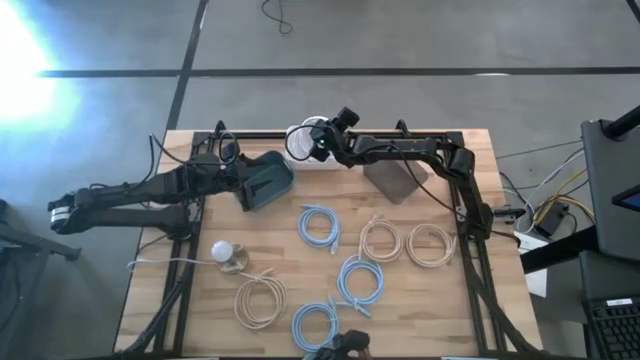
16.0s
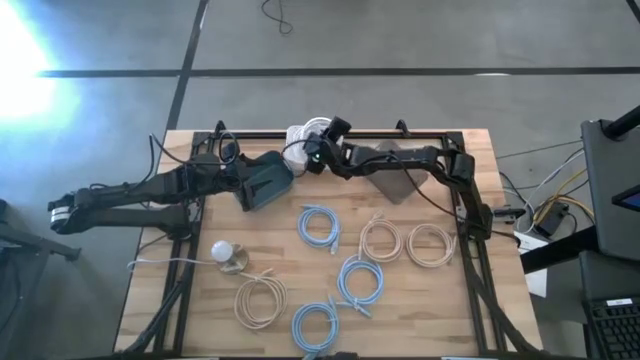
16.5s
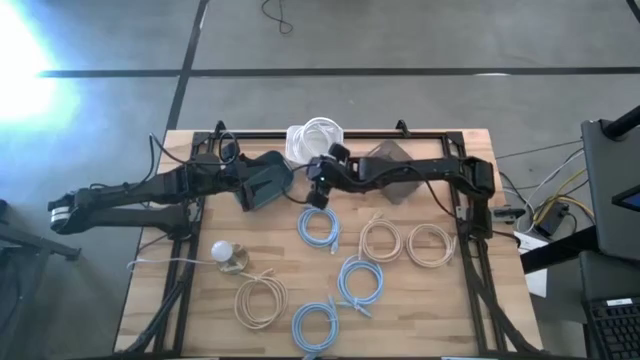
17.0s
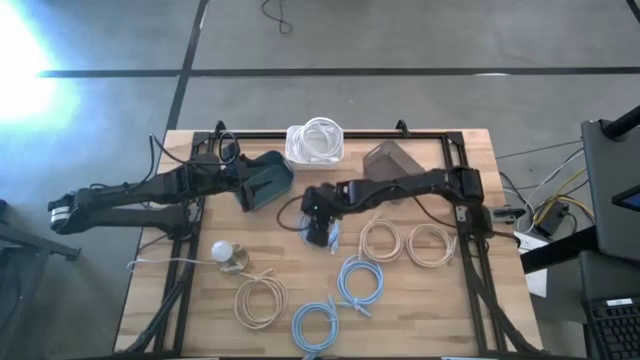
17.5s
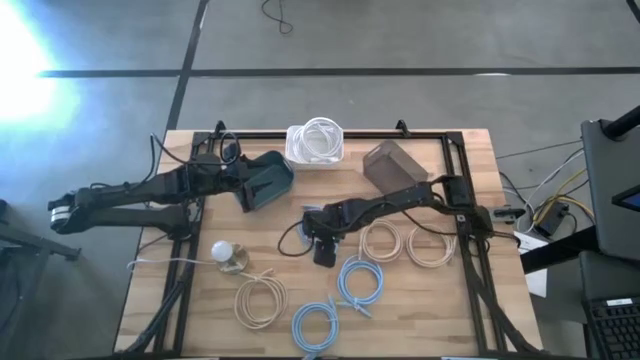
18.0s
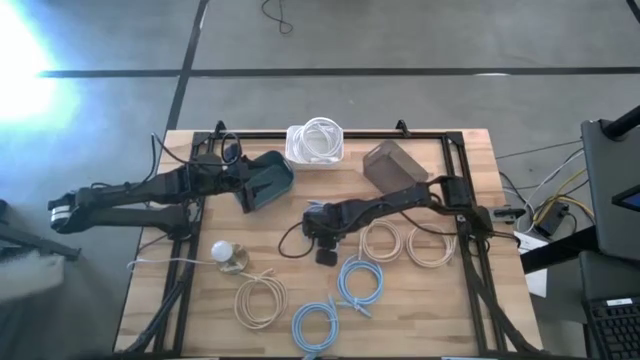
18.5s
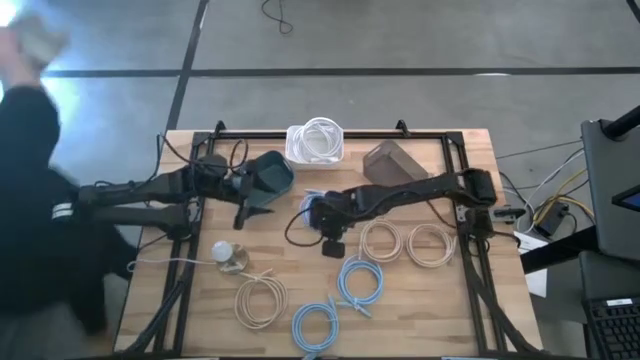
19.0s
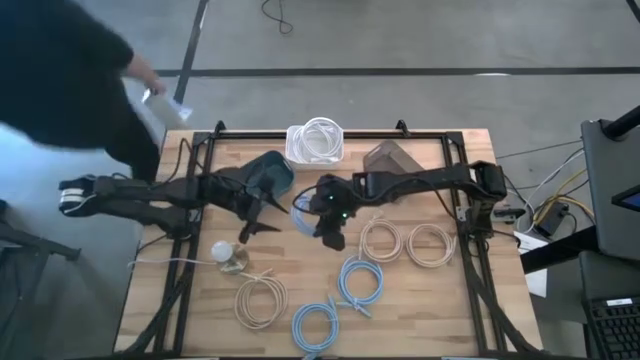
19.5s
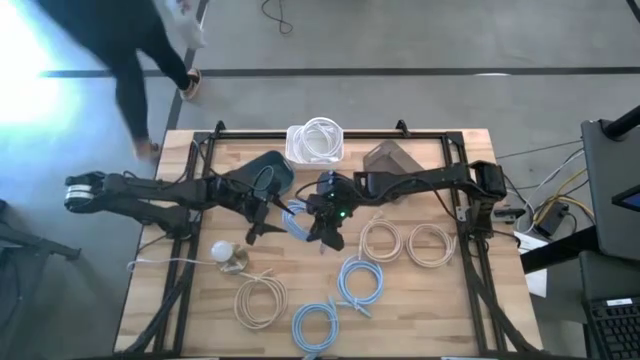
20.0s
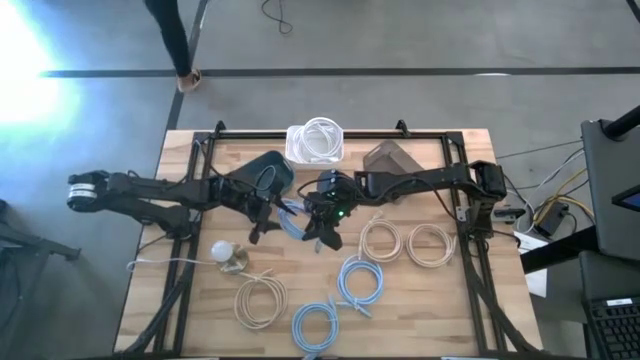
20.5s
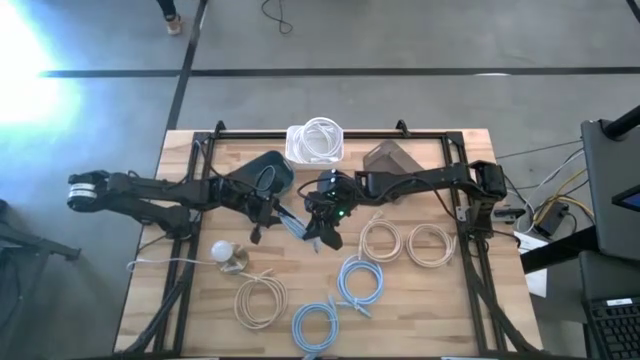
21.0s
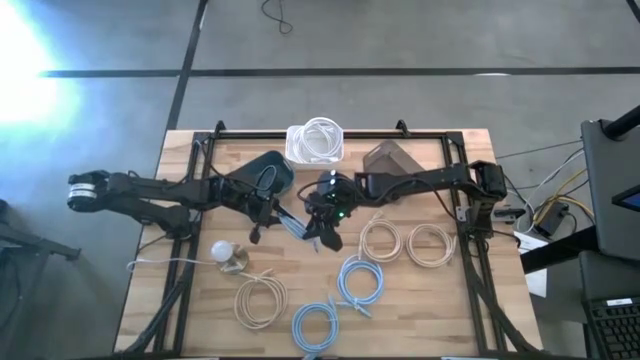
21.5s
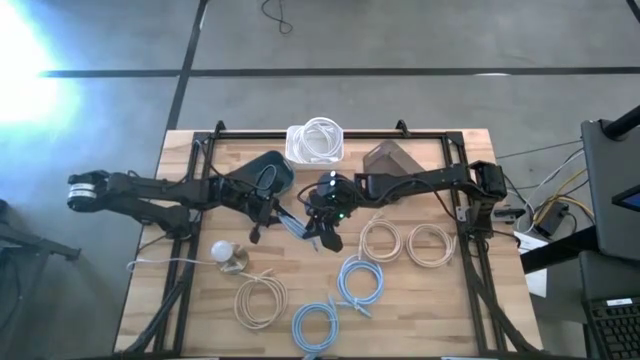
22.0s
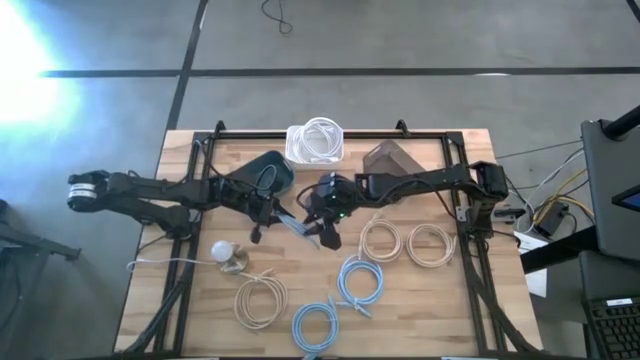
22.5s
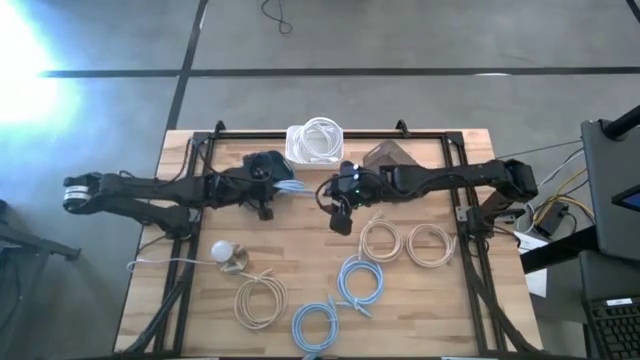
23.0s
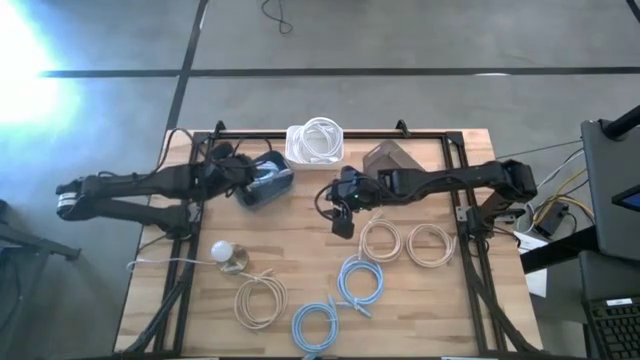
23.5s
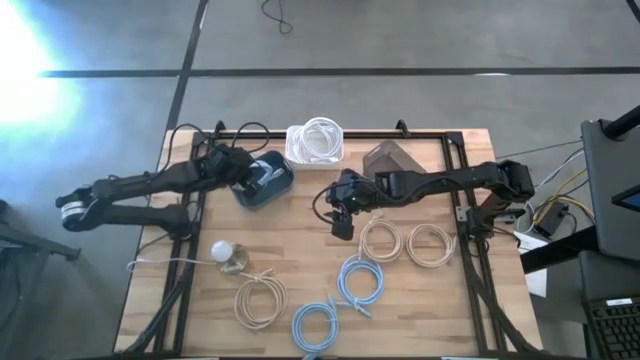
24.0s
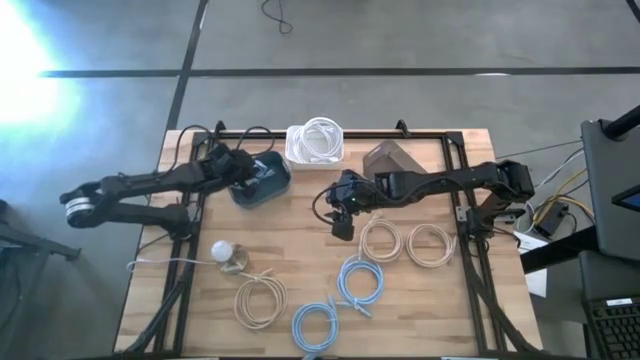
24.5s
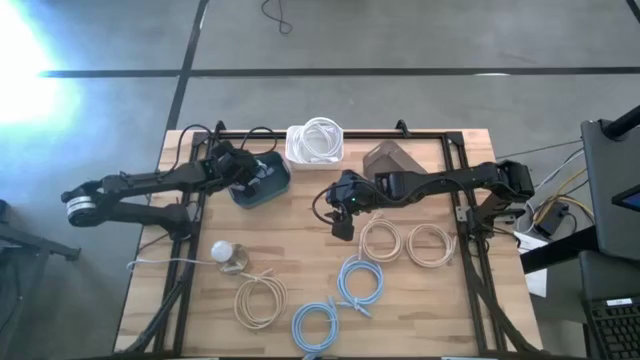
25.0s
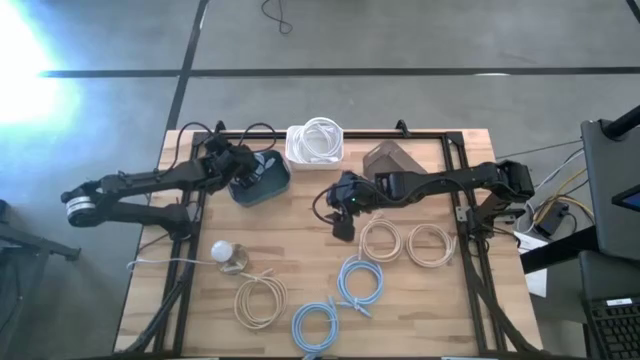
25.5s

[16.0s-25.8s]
Task: Sort HDMI cables
Put the top left blue HDMI cable into the blue bin

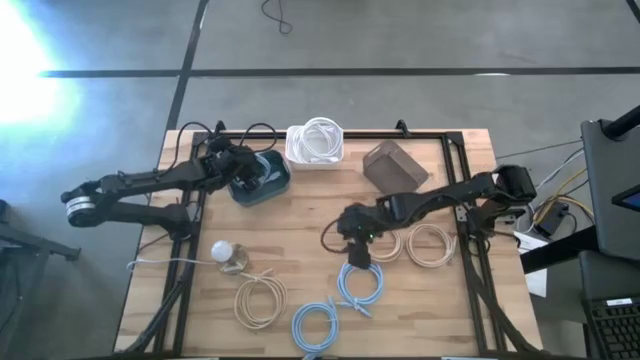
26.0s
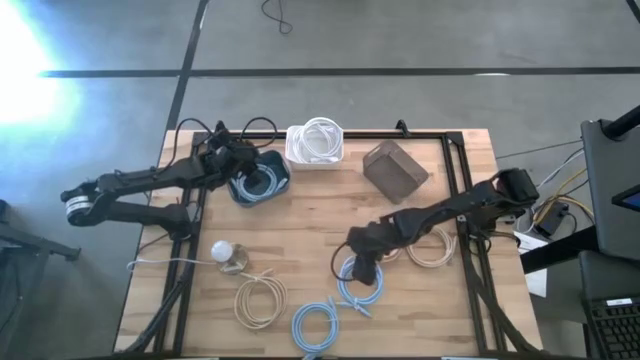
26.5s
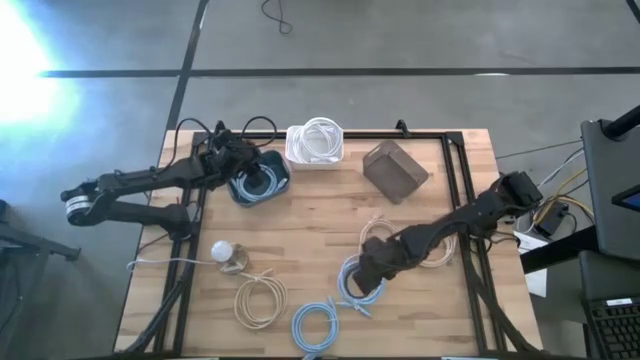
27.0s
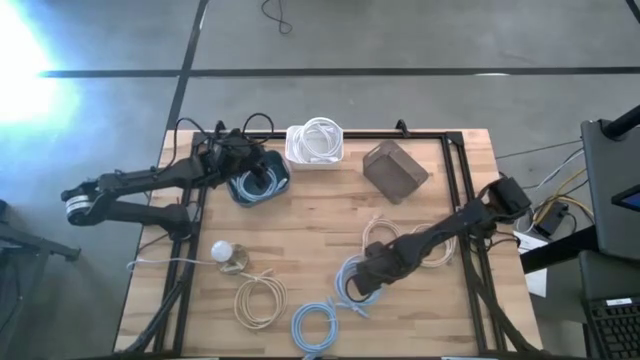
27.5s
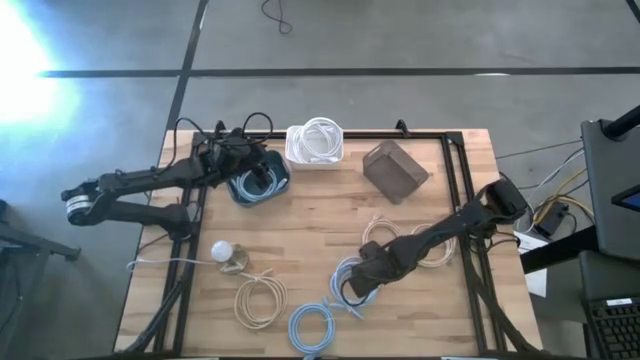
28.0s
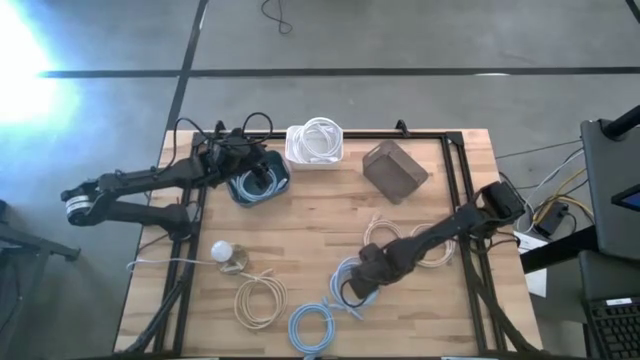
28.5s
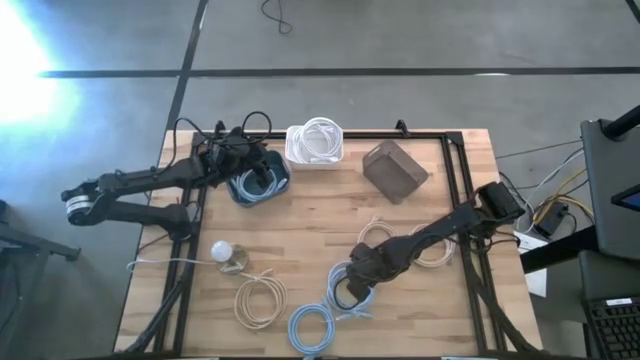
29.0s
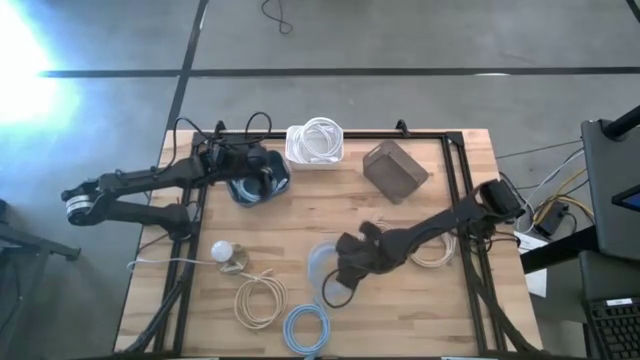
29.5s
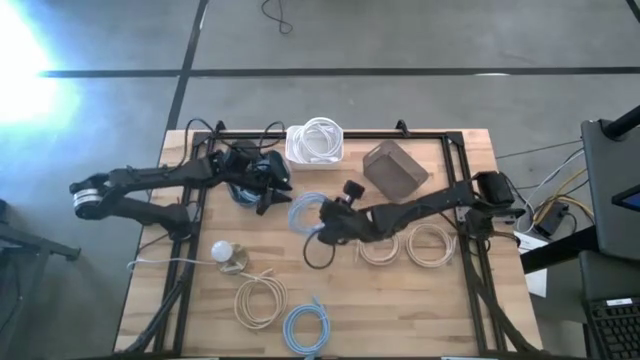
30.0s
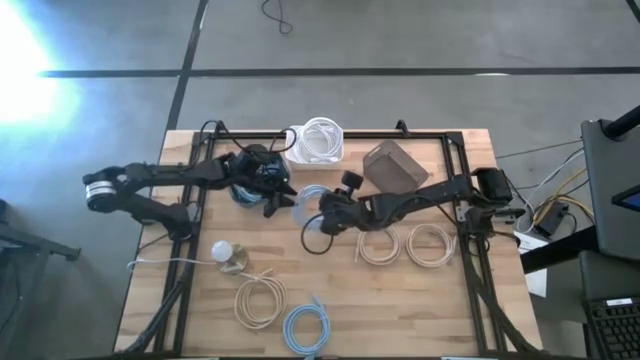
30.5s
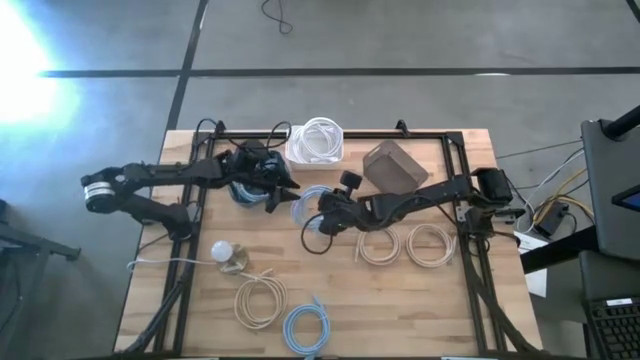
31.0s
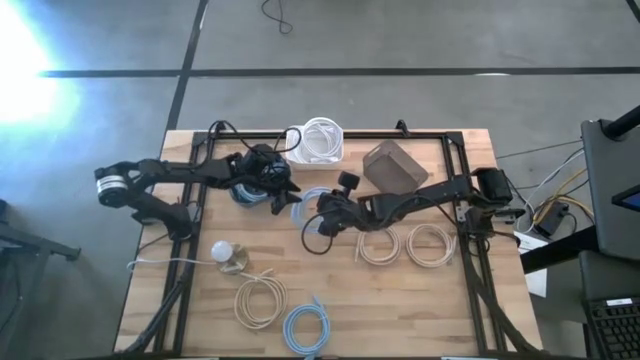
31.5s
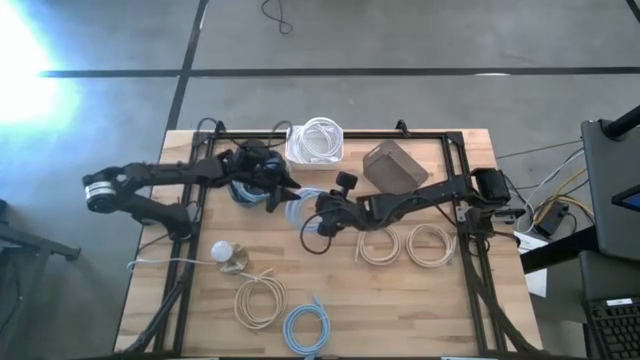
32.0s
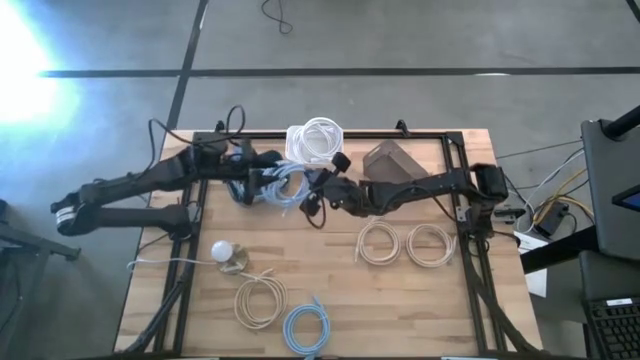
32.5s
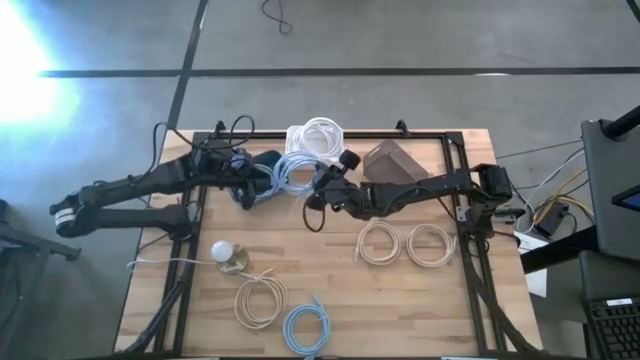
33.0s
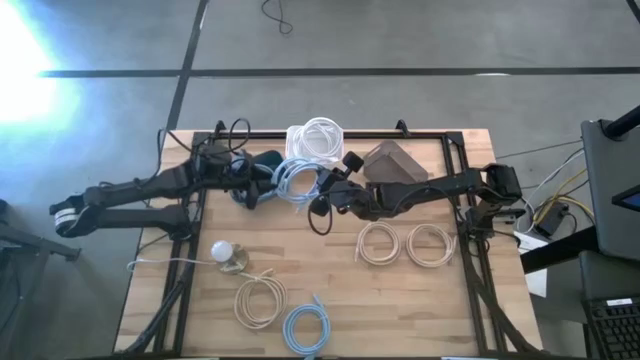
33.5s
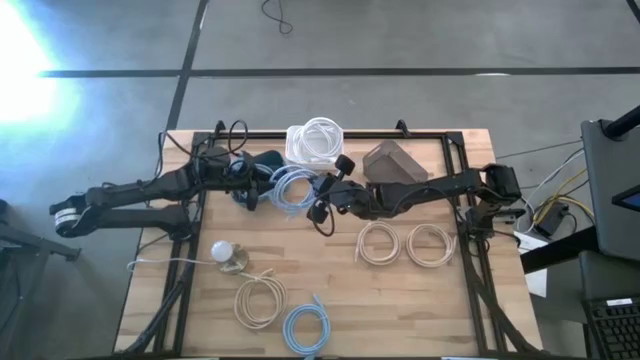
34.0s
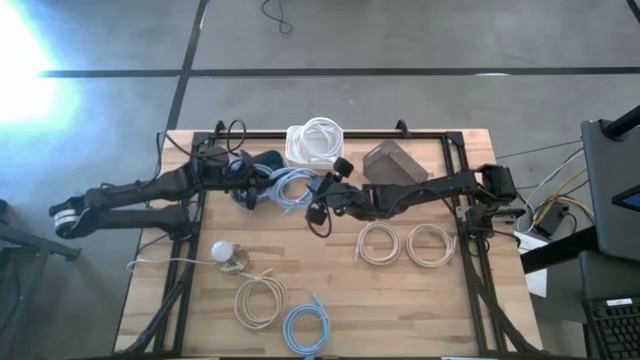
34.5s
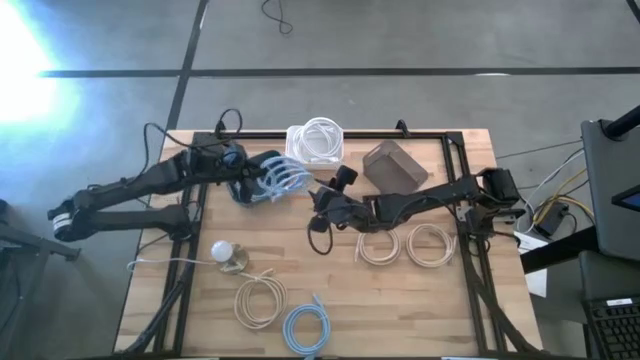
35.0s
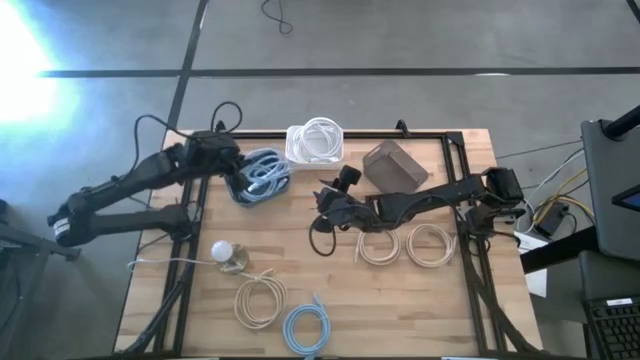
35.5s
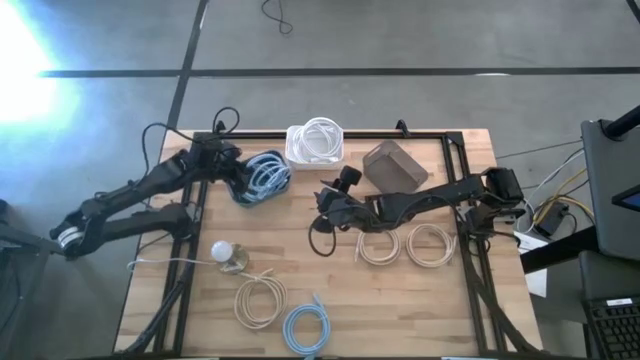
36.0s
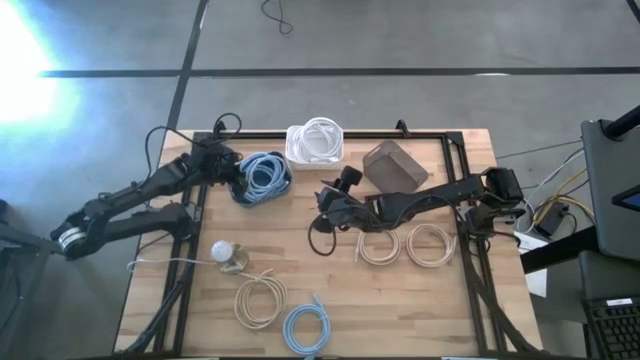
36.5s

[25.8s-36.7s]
Put the top blue HDMI cable into the blue bin

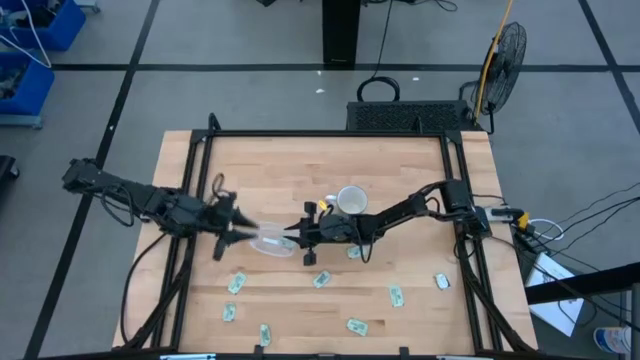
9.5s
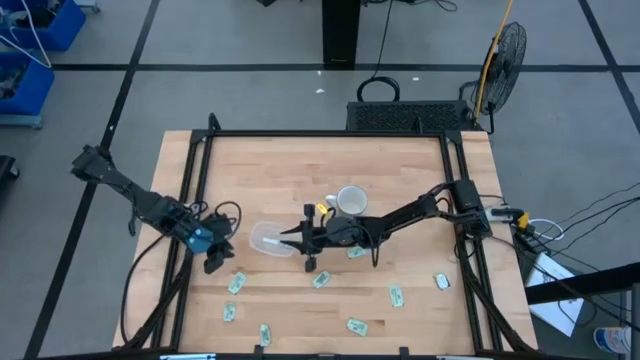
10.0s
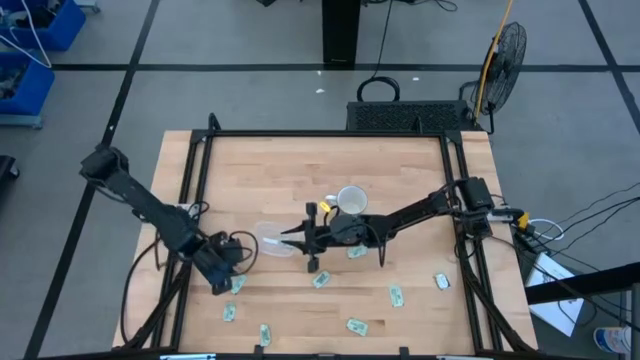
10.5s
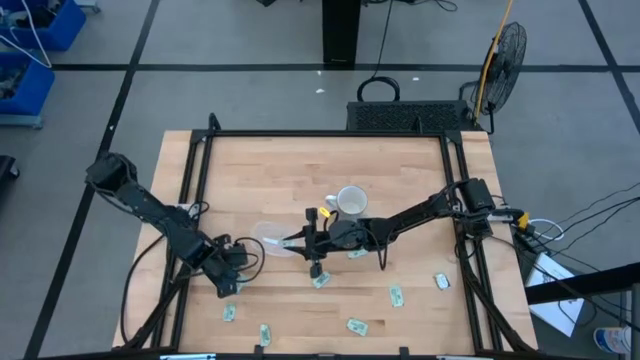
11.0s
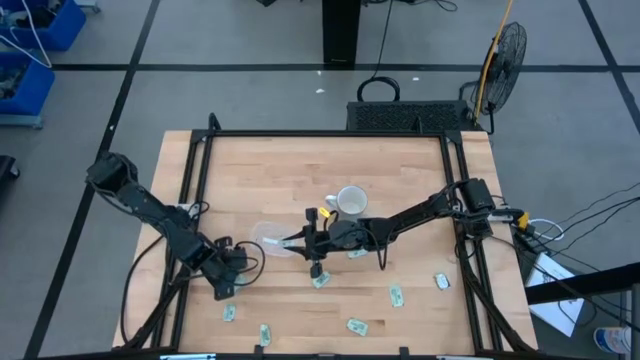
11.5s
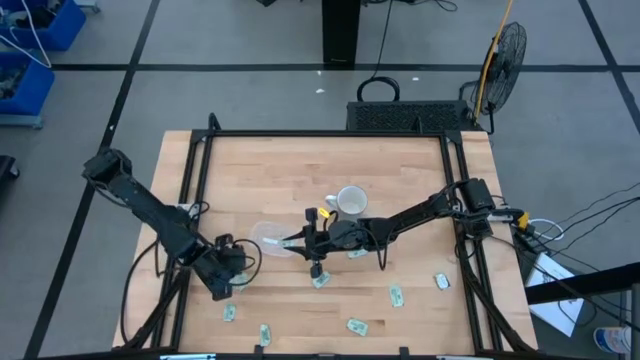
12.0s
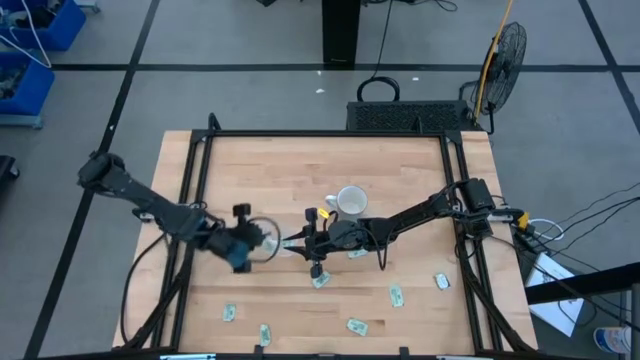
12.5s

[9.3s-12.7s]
Task: Pick and place Stevia / Truvia into bins
Put the green stevia packet into the transparent bin
